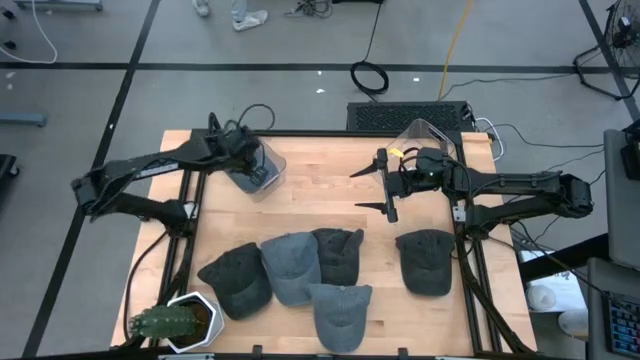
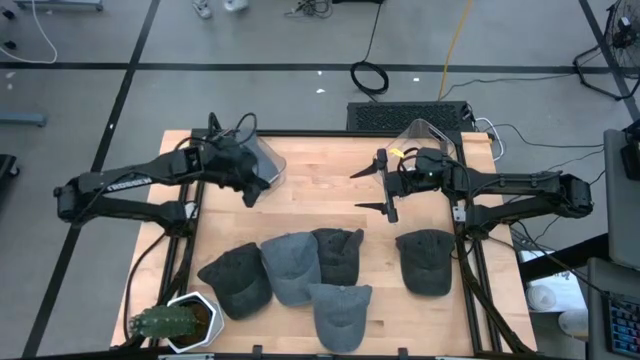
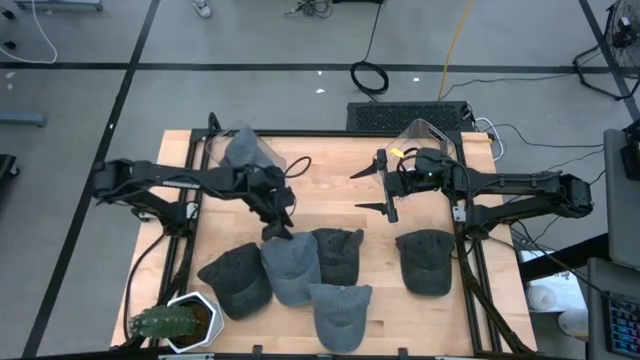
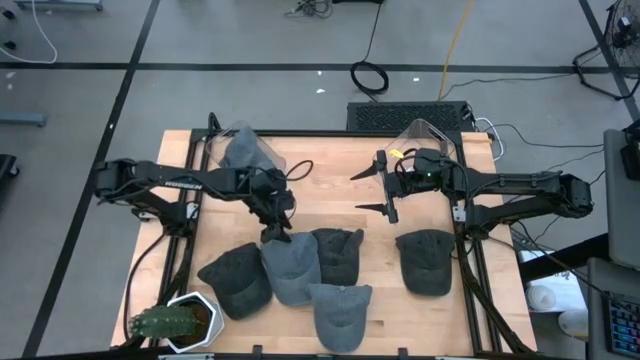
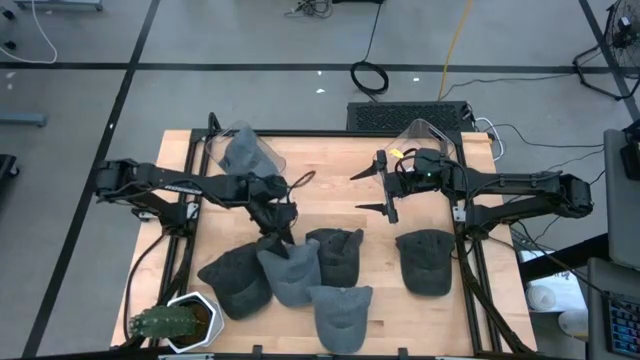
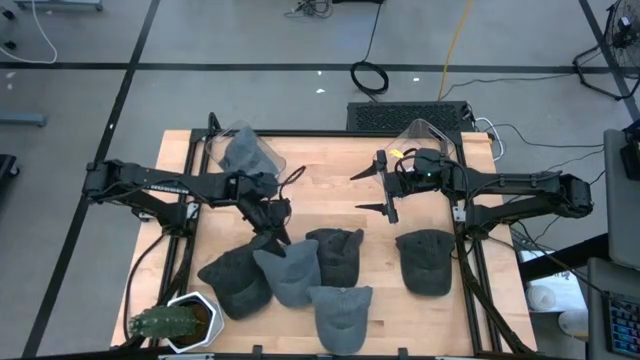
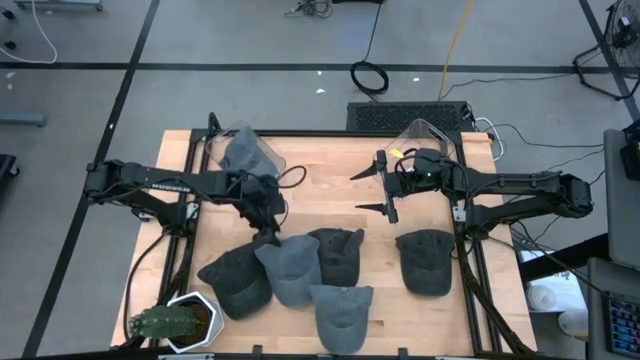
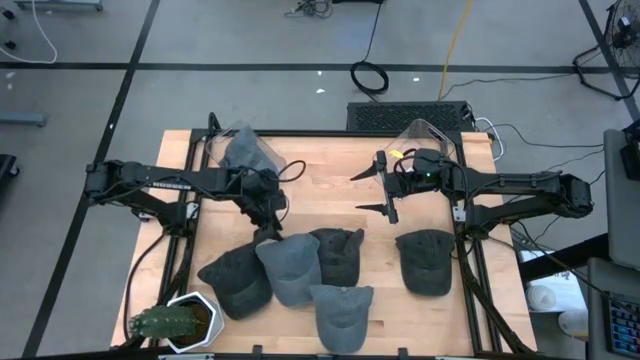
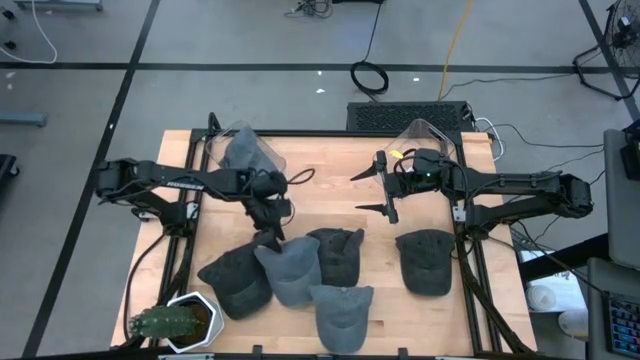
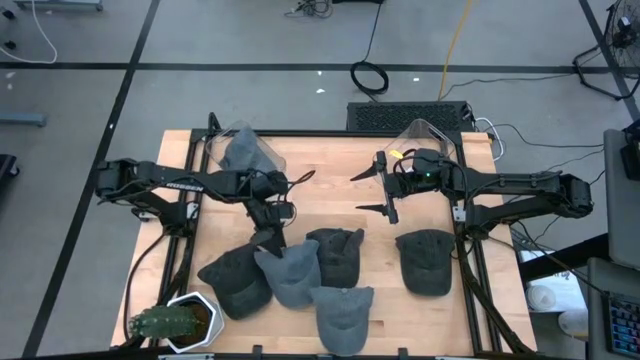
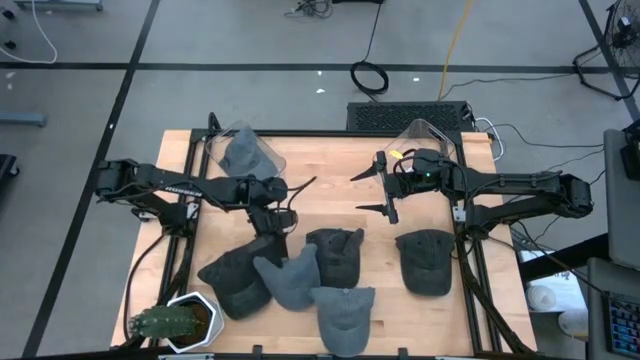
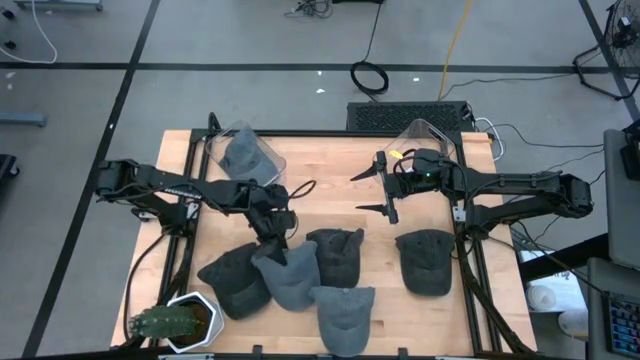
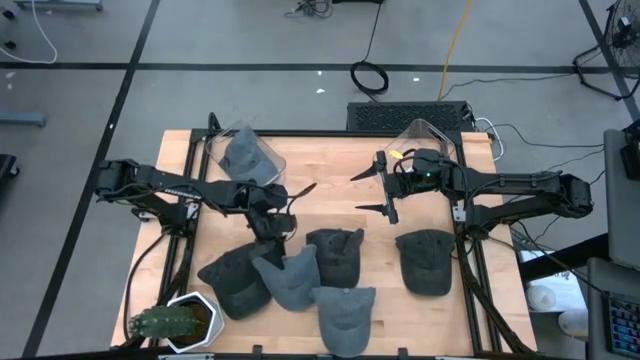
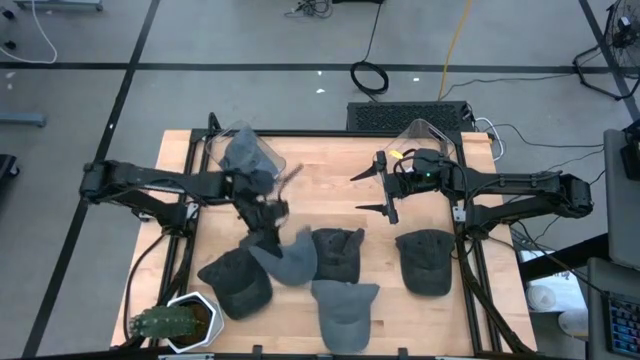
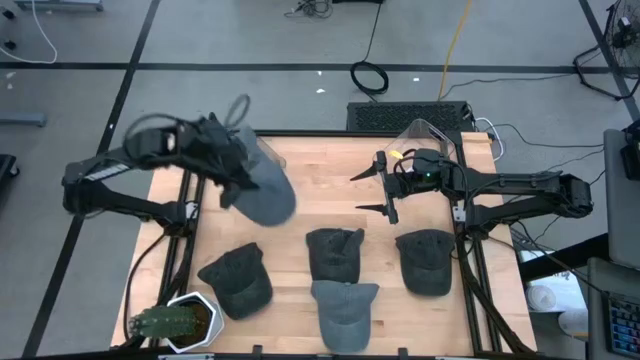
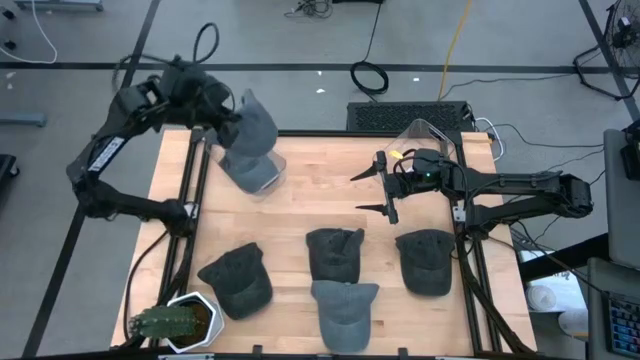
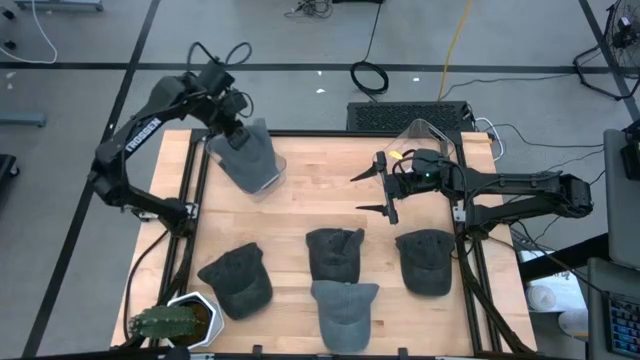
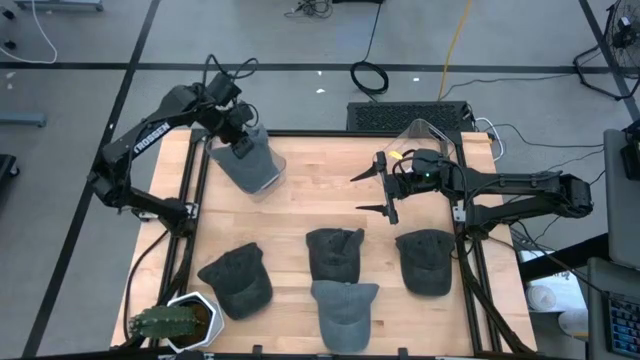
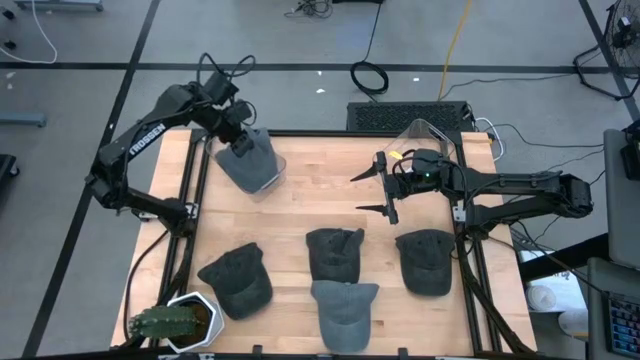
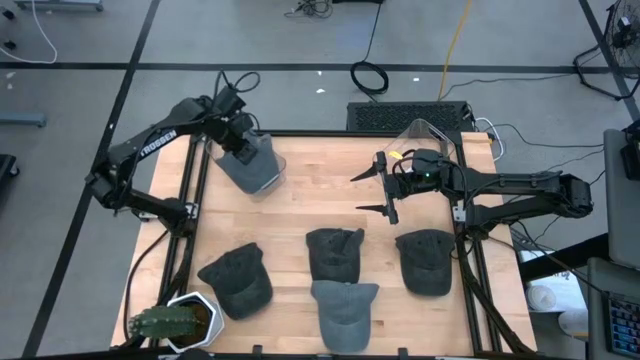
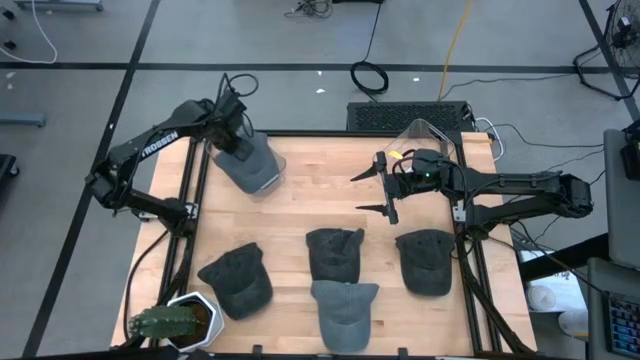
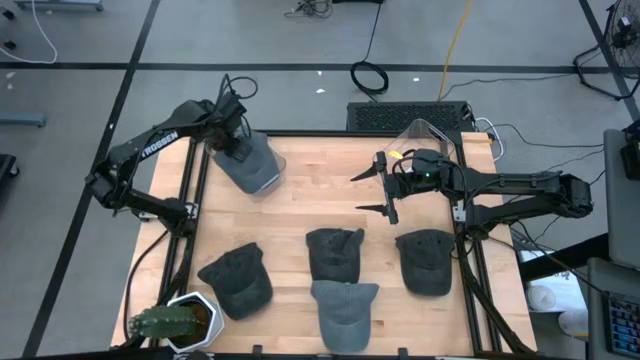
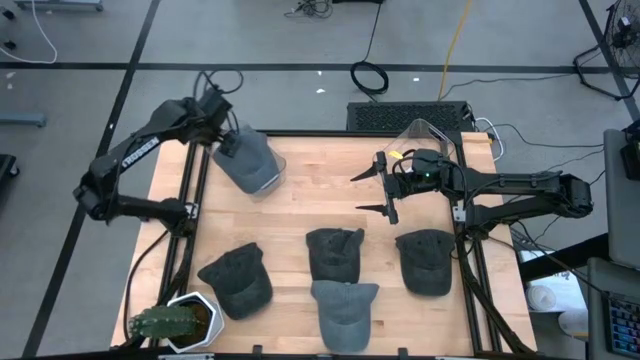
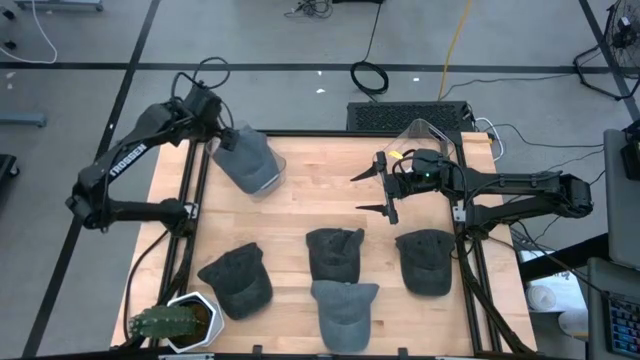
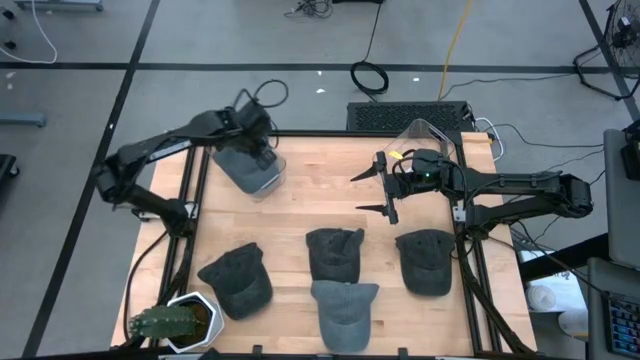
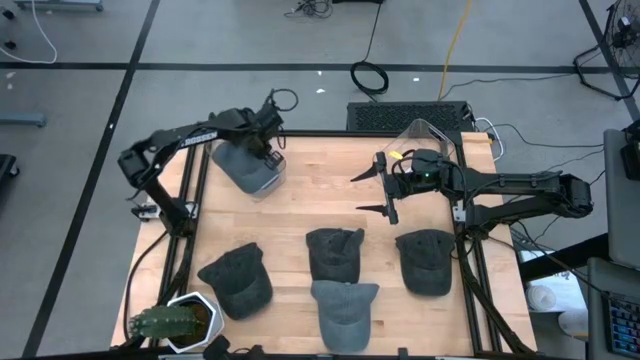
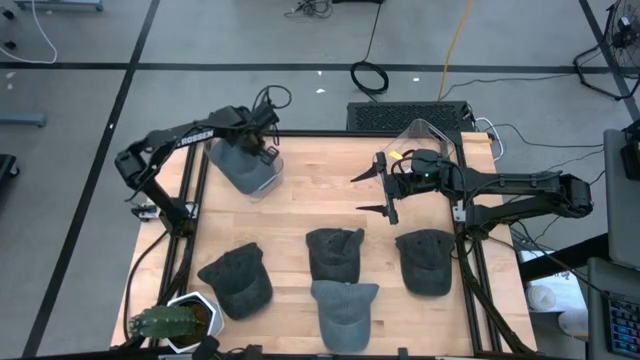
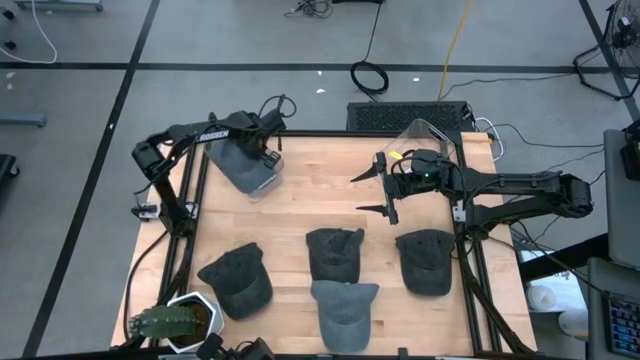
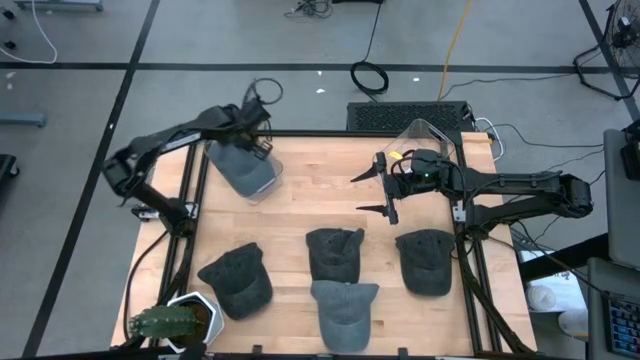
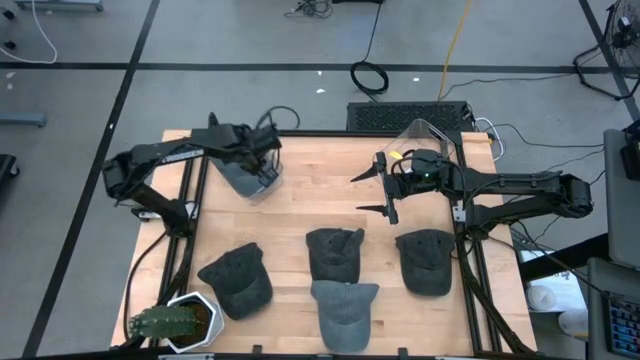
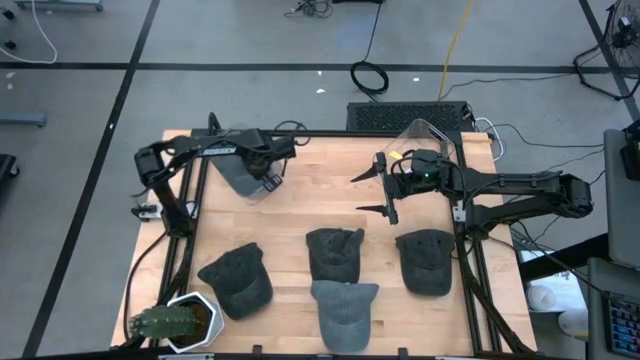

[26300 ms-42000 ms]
Task: Pick & Place hat
Put the left blue cap into the left transparent bin

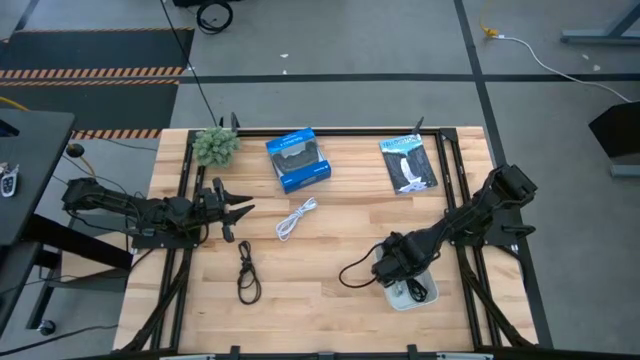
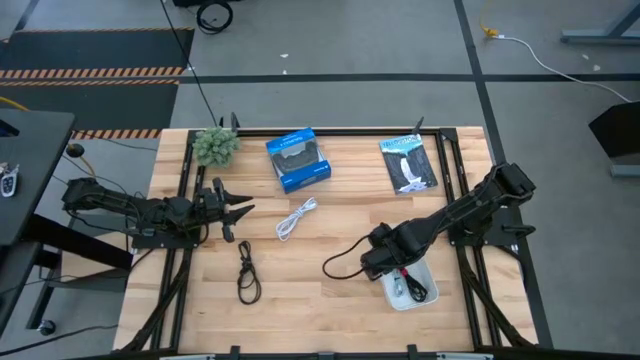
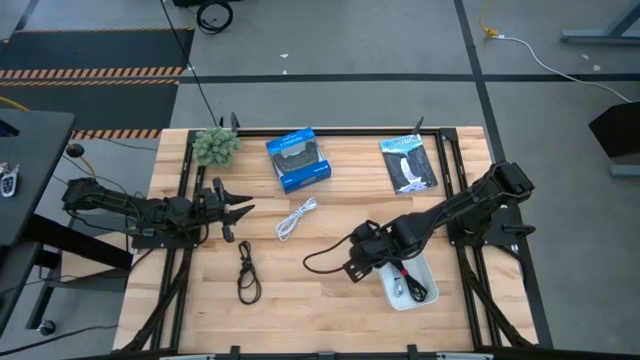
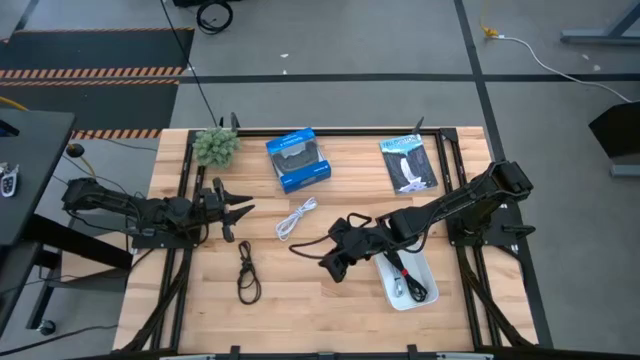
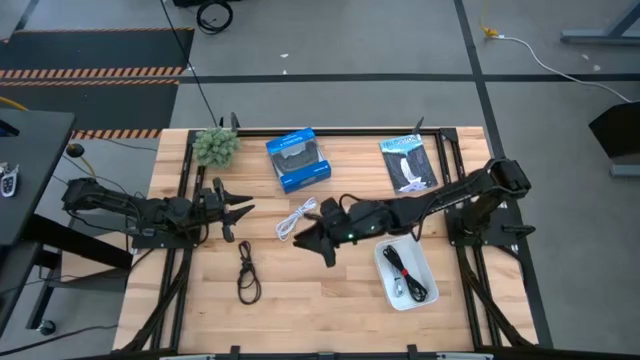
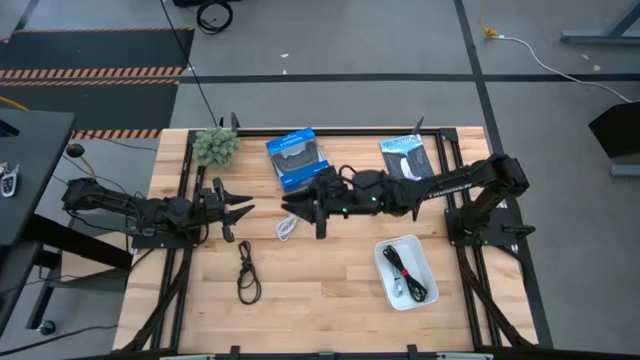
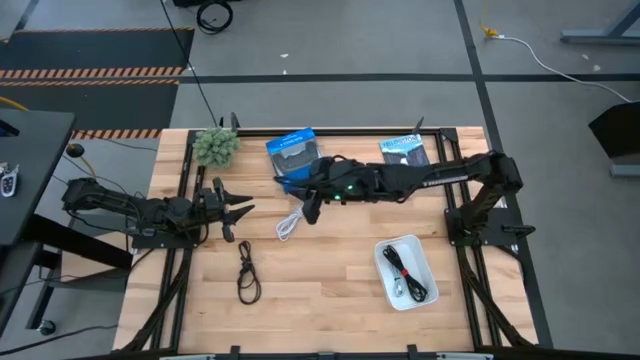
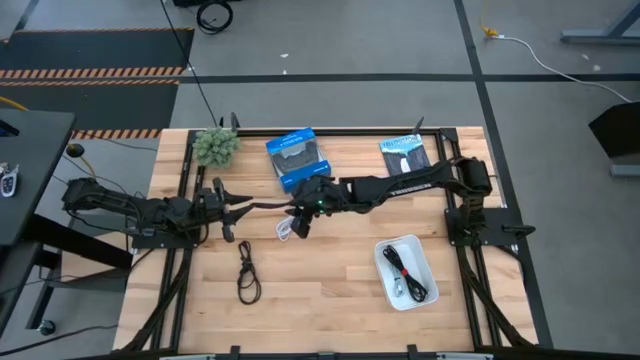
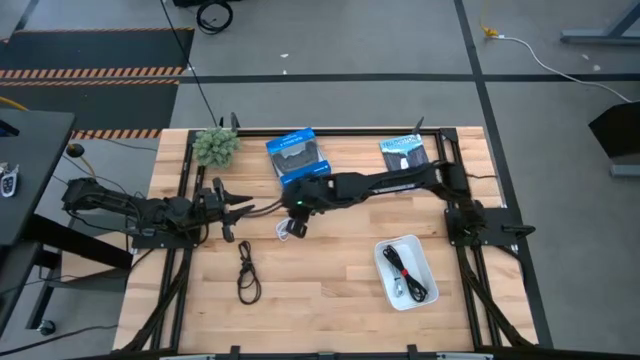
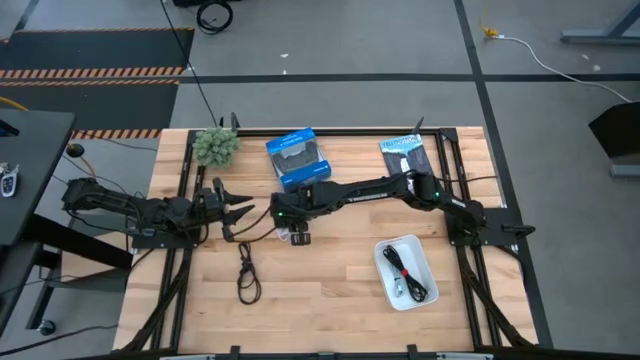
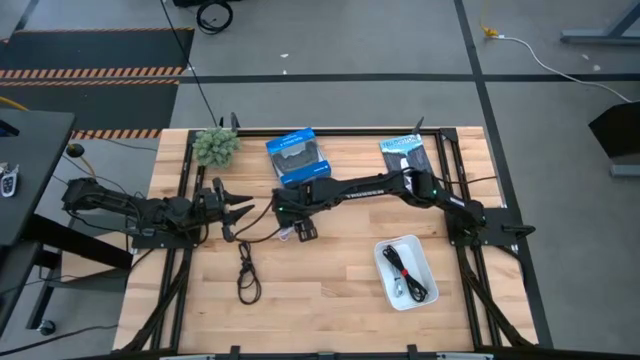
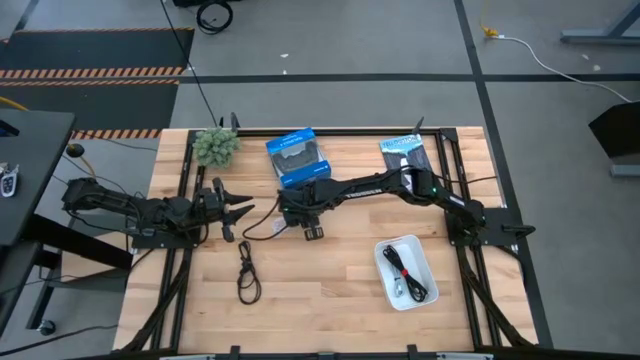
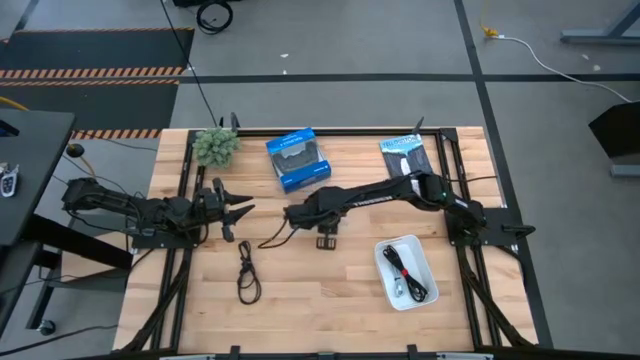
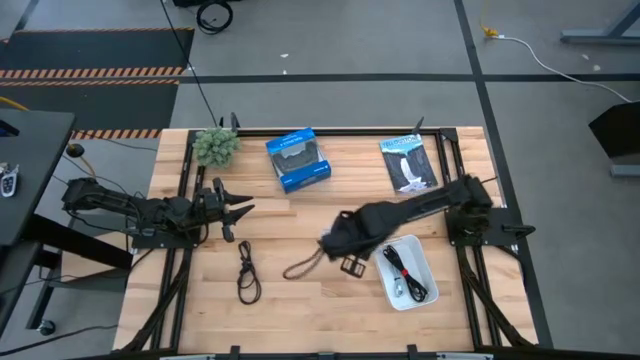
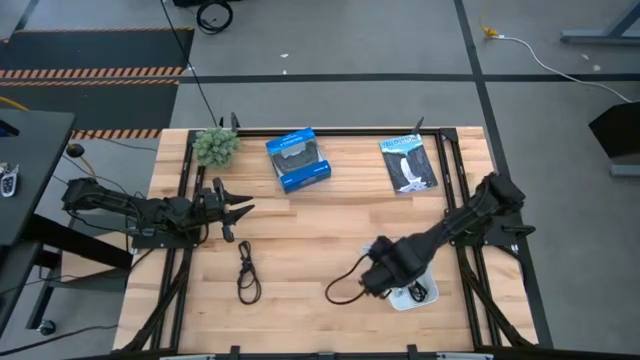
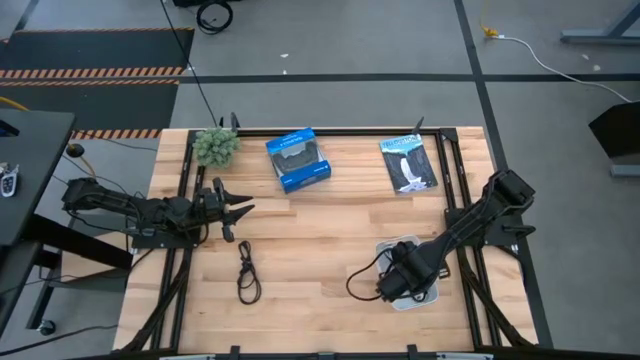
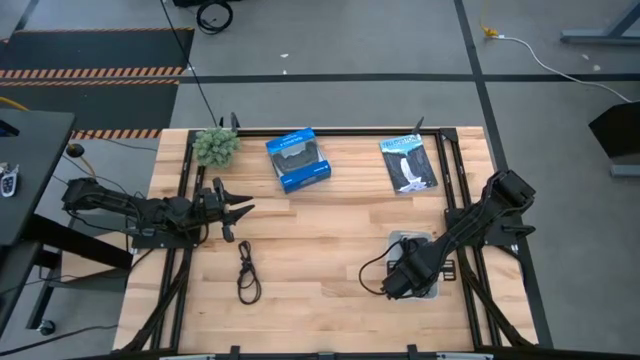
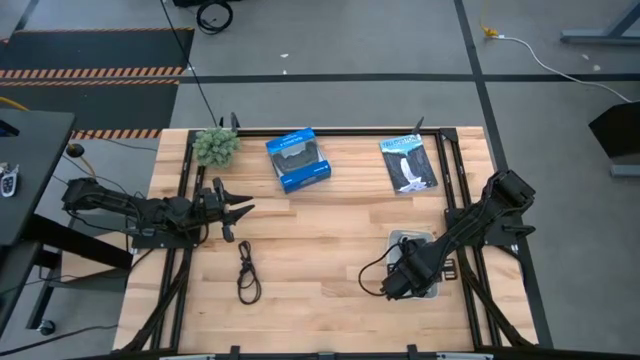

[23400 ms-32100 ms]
Task: Pick and place USB-C Cables
Put the white charger cable into the white bin
